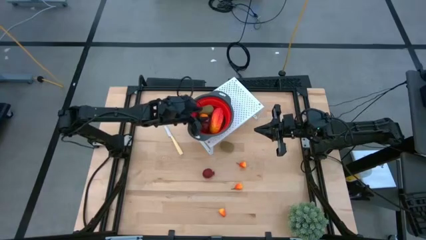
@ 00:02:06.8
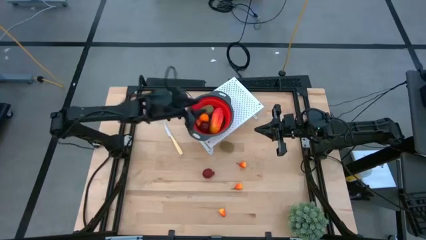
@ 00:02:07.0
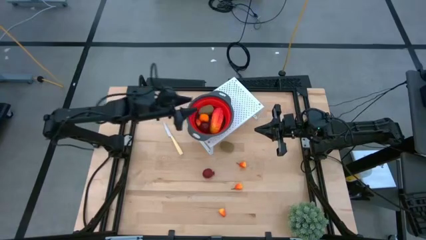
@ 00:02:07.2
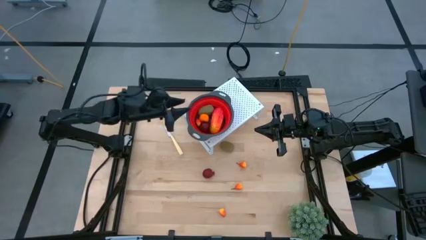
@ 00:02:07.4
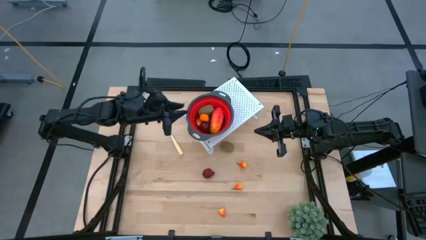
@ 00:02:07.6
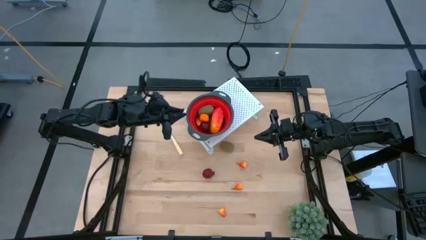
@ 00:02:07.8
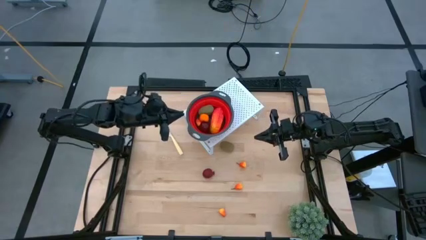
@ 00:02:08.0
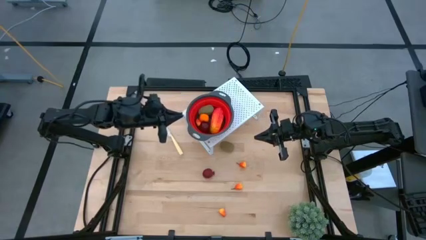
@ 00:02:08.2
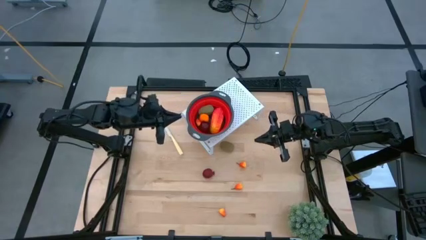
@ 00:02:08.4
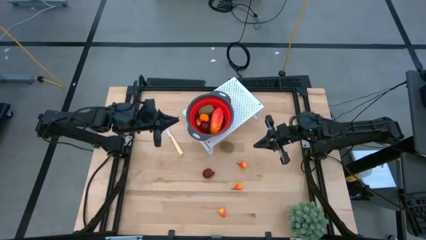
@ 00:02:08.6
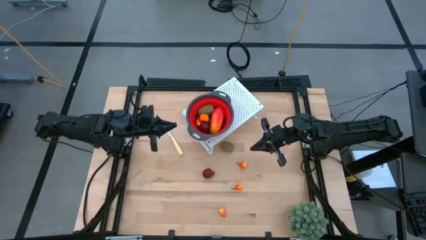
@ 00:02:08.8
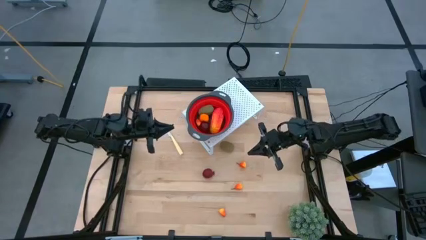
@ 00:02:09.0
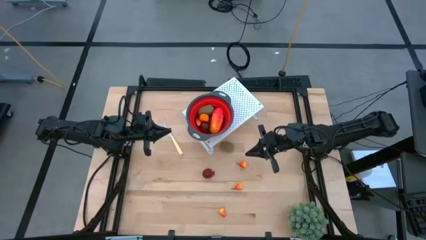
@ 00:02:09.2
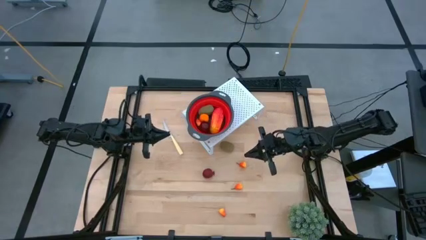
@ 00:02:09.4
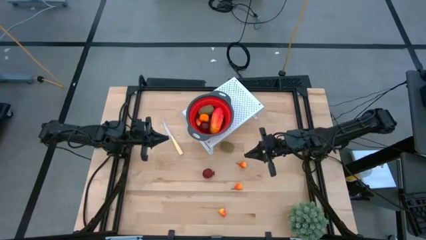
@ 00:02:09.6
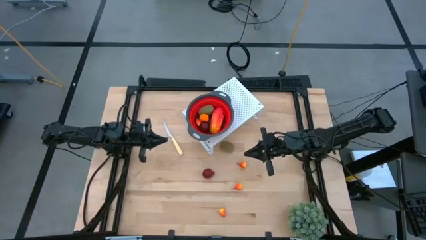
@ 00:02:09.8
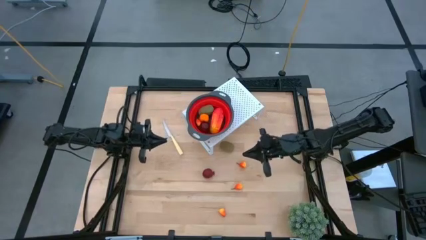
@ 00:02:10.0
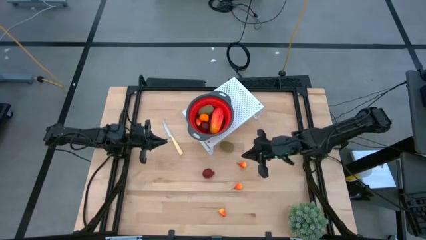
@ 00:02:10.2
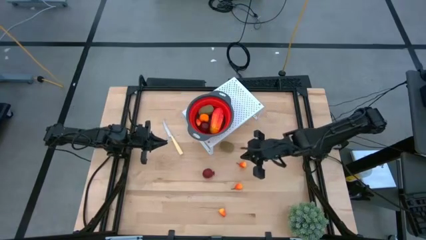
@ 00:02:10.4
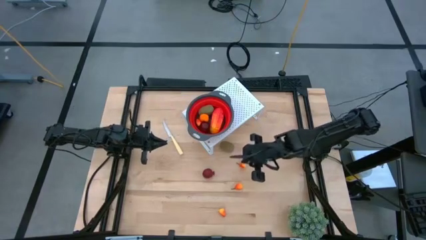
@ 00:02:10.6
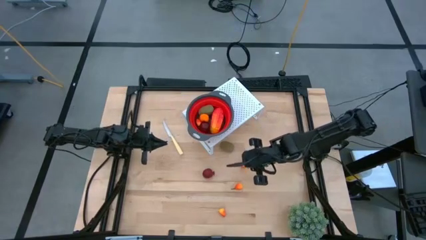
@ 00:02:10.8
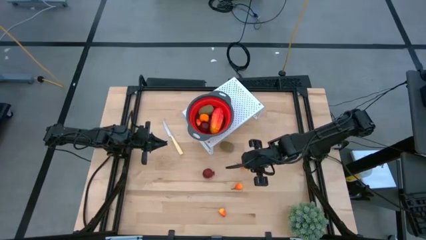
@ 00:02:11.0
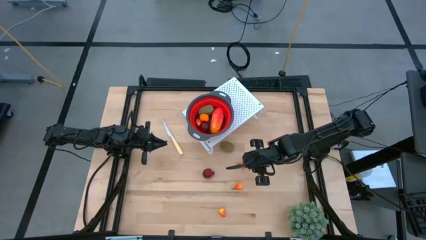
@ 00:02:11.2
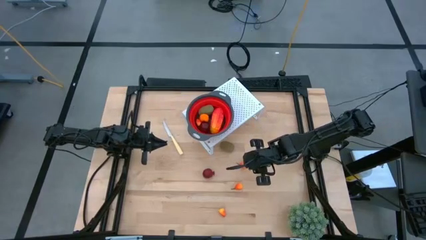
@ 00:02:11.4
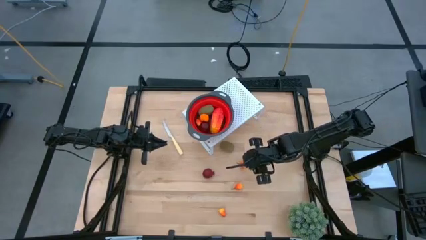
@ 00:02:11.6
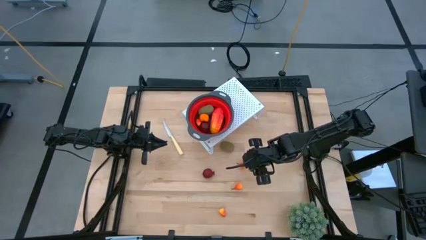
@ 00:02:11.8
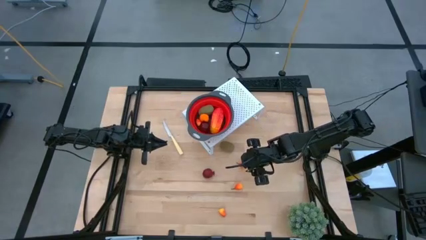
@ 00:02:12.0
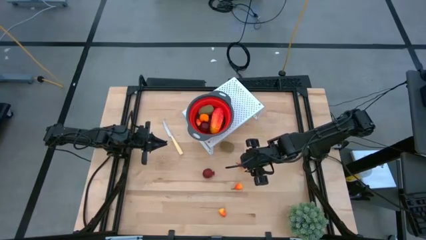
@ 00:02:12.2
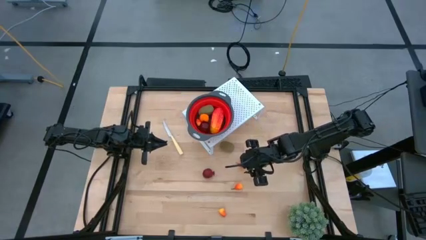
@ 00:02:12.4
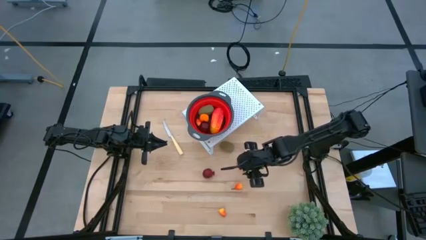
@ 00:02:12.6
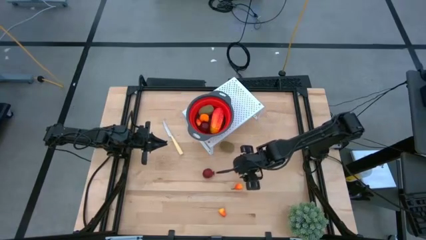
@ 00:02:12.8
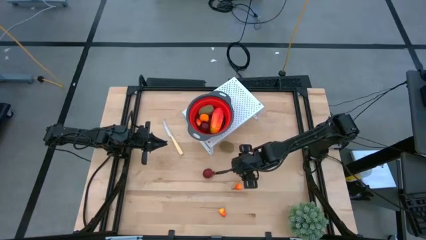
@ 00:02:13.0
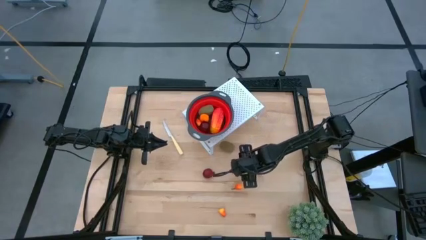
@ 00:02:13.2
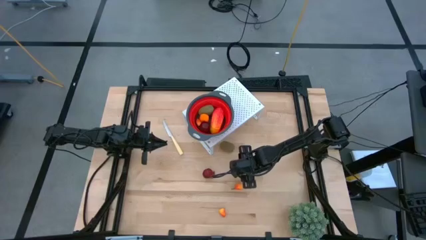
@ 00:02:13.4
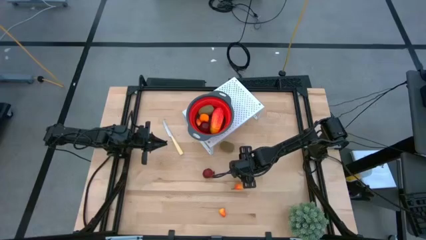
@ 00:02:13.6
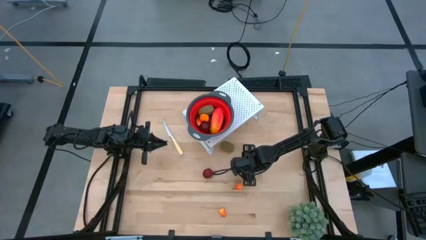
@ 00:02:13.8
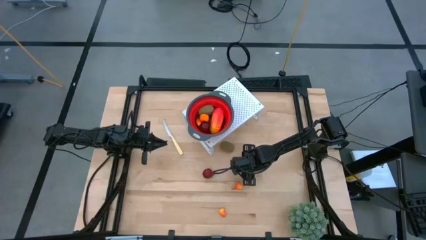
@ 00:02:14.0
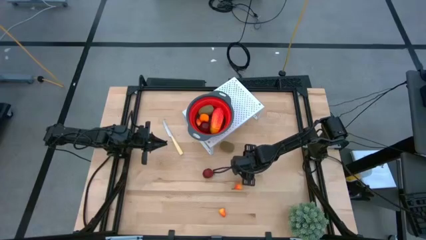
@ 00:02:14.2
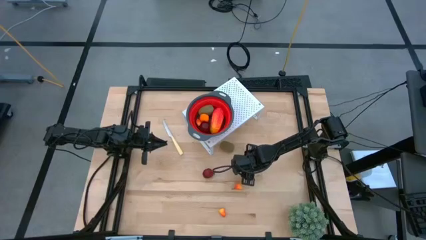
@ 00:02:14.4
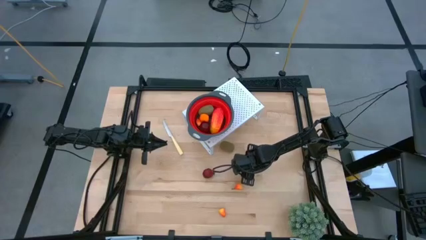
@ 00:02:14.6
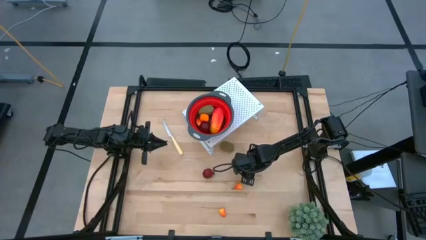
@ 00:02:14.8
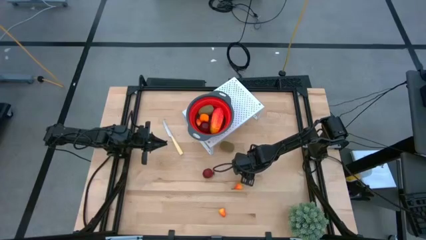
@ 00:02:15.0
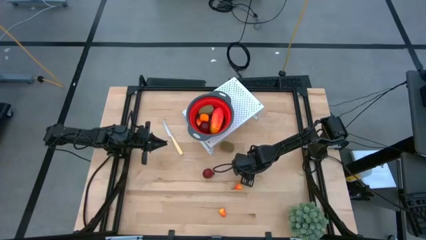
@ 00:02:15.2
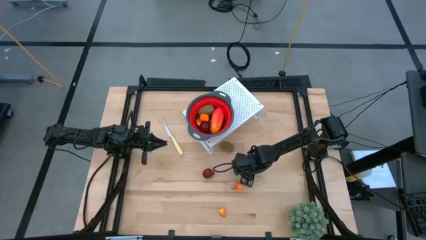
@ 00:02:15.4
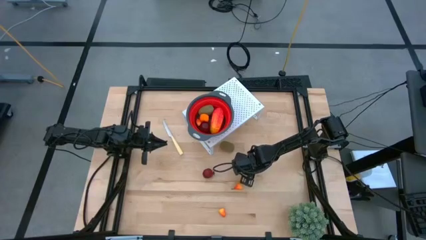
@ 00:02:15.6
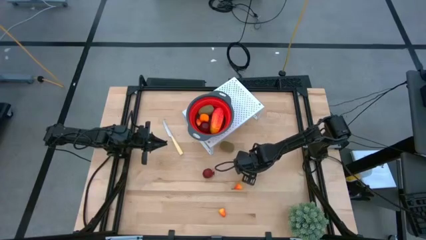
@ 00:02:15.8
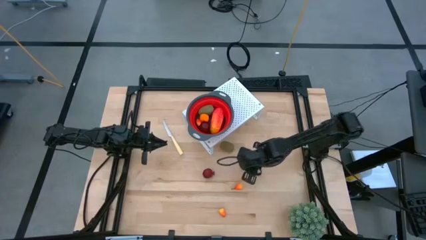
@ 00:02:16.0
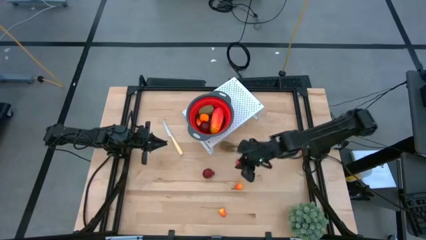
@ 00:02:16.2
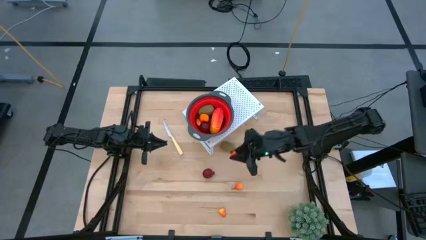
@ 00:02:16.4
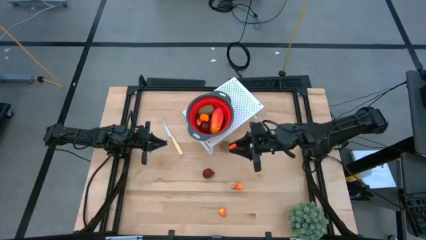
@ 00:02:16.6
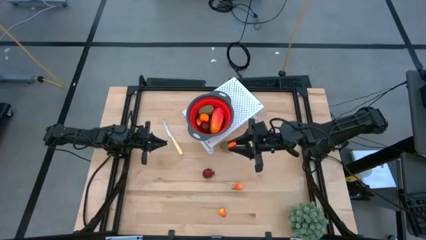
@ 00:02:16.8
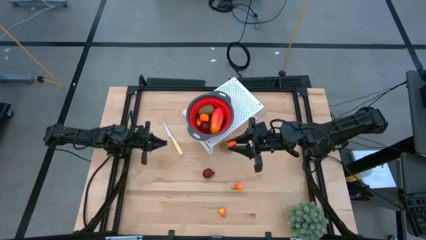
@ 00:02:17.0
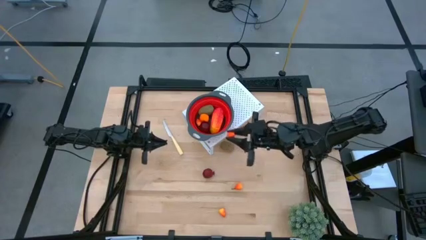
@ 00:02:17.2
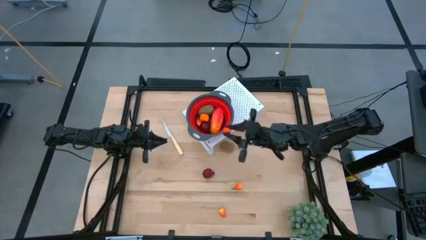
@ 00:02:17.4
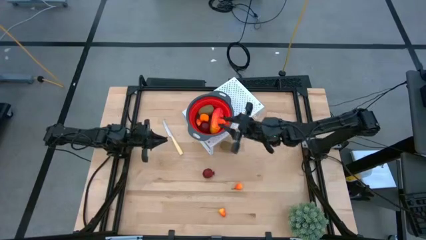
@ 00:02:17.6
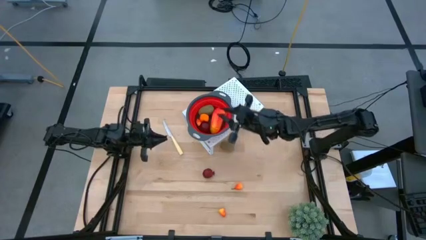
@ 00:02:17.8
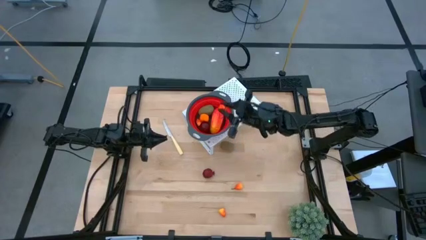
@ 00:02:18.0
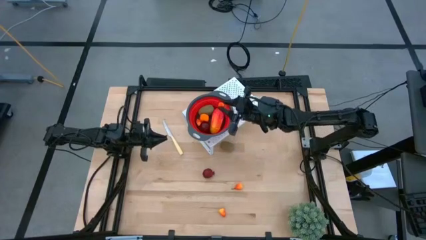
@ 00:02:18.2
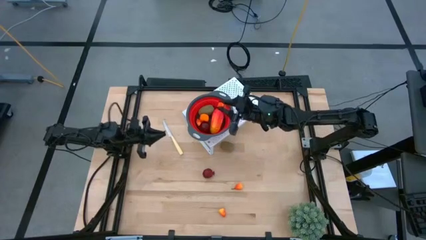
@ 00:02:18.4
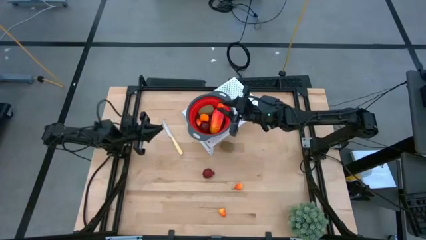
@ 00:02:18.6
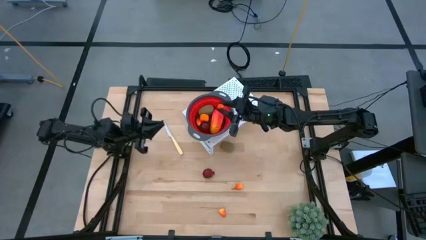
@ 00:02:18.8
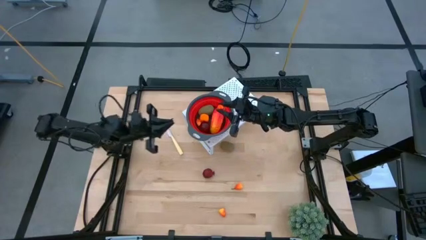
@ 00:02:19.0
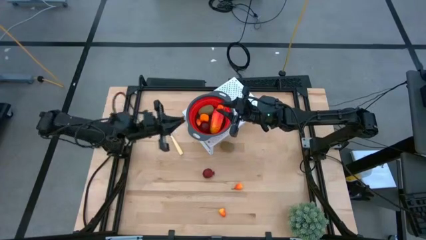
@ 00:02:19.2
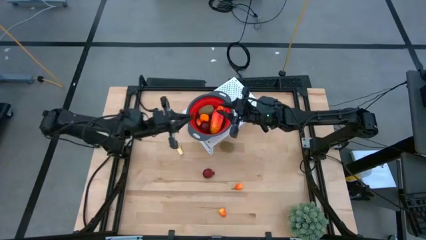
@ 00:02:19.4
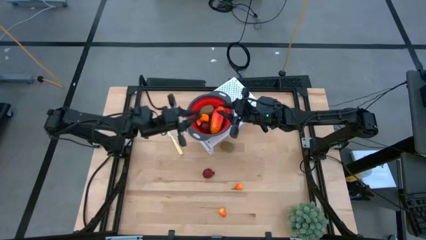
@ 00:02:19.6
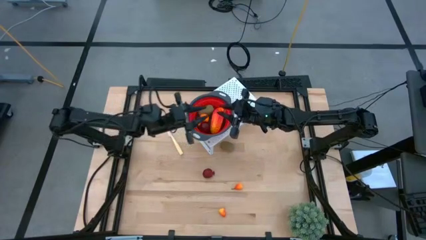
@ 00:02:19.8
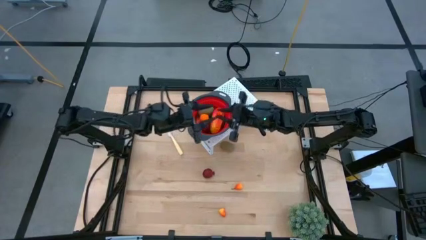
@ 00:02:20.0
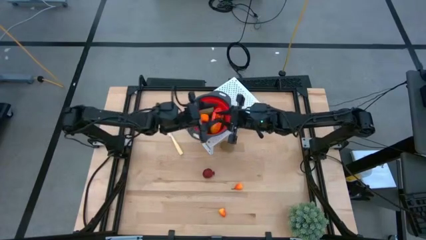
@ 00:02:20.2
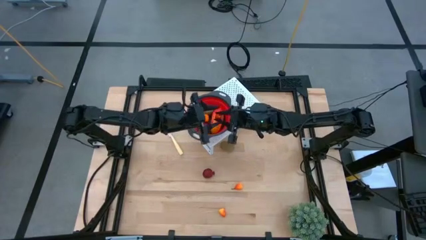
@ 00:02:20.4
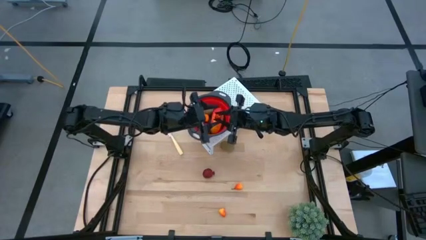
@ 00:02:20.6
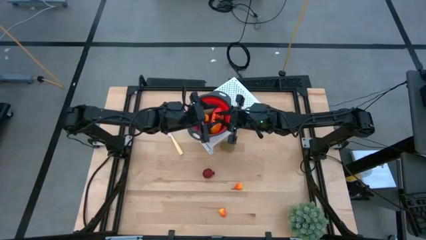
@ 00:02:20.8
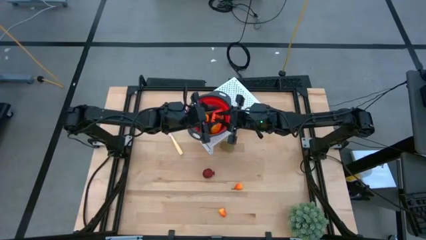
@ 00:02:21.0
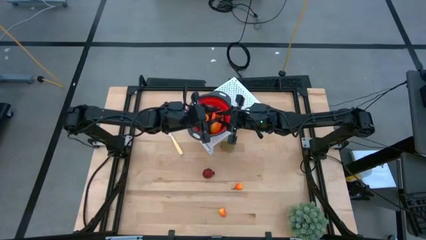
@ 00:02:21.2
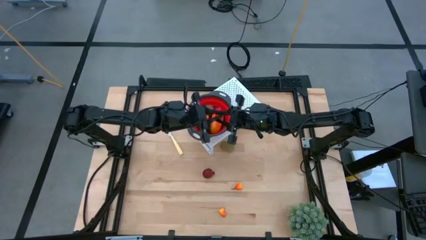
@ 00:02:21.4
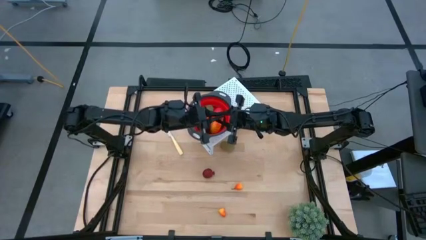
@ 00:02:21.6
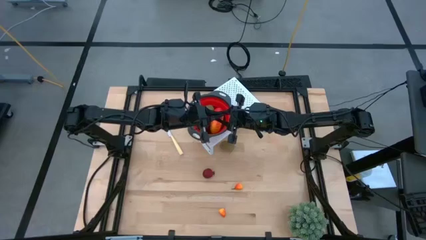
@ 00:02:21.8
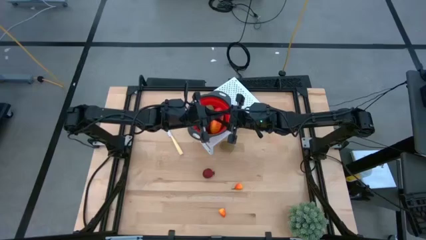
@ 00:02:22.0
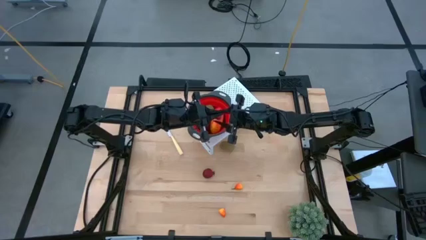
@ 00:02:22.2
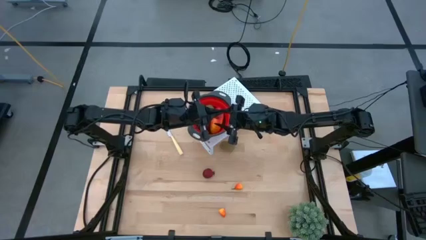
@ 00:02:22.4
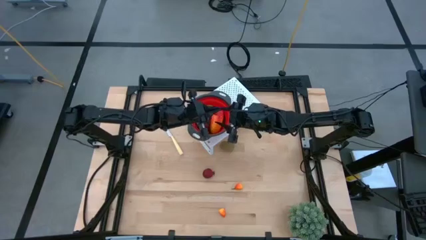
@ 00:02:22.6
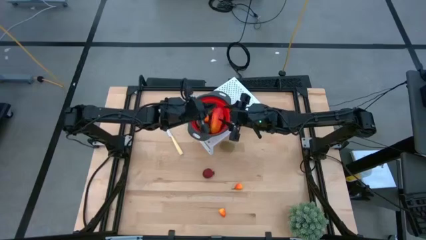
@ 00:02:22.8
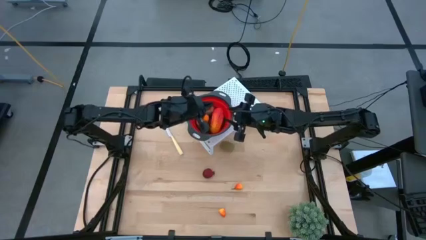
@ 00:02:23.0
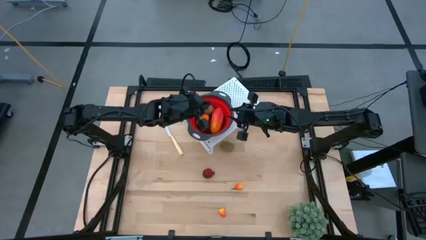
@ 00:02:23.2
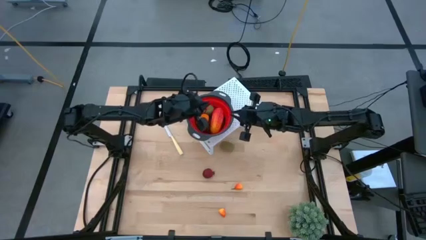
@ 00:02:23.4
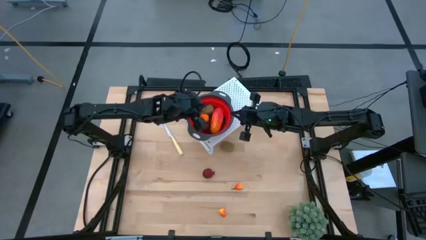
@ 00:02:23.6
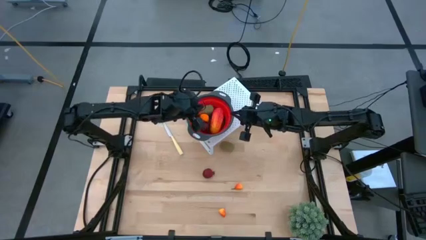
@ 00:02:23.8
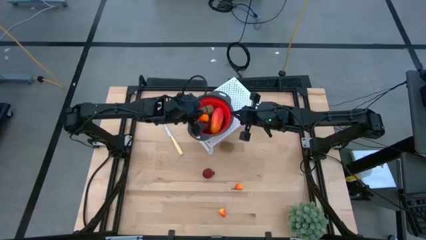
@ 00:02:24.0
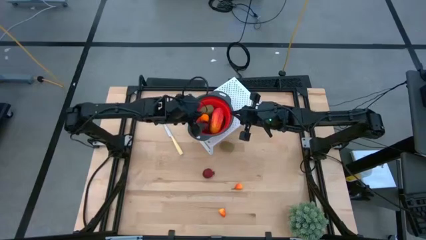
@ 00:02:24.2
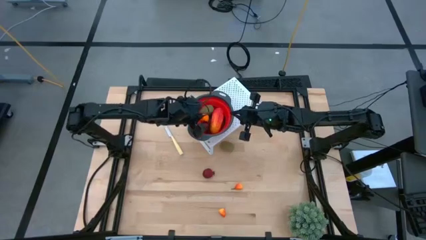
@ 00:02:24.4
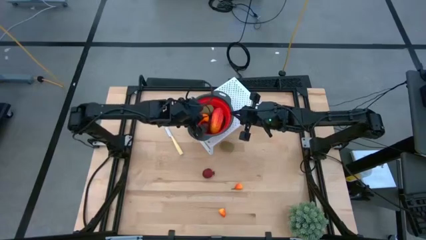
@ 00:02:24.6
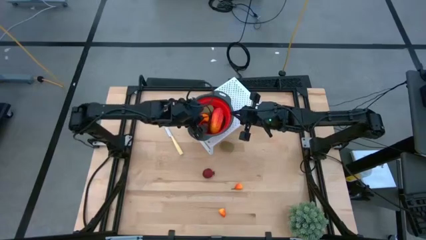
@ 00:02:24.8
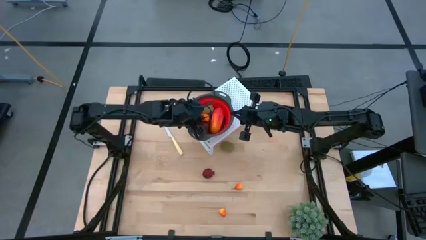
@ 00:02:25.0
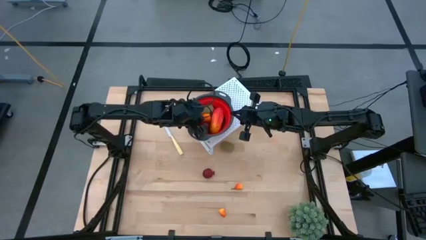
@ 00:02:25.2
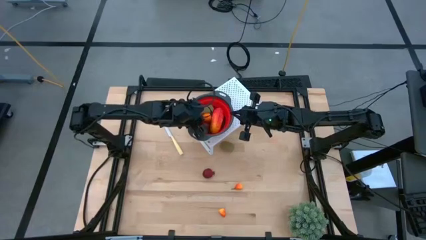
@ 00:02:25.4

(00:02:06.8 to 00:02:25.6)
Task: Pick & Place Fruit
Put the peach into the red strainer bowl on the shelf
